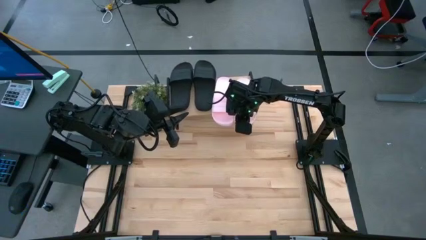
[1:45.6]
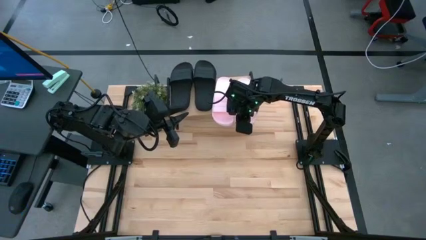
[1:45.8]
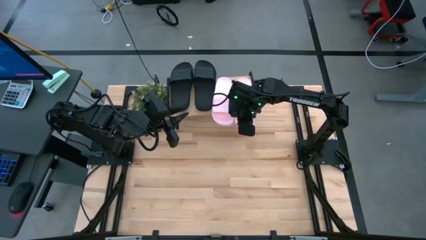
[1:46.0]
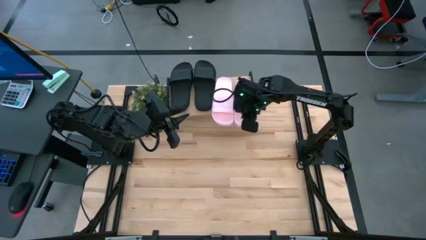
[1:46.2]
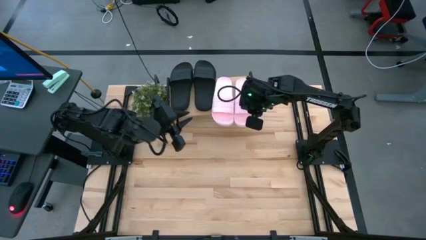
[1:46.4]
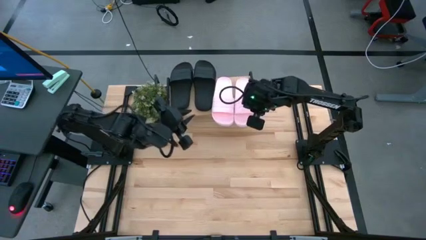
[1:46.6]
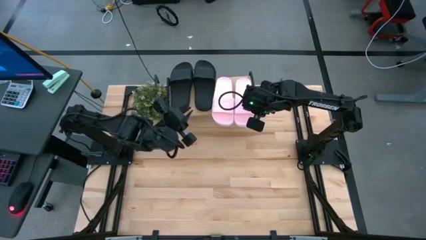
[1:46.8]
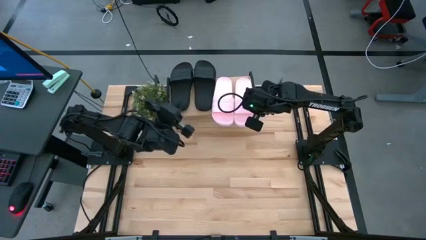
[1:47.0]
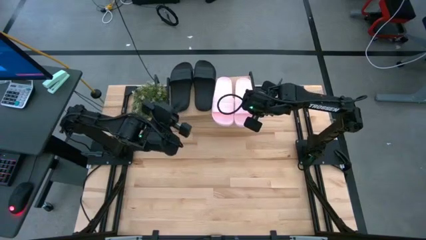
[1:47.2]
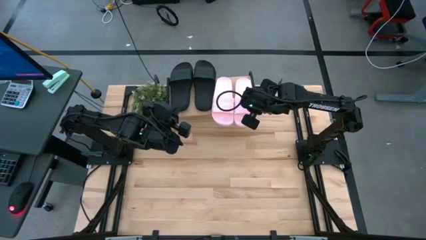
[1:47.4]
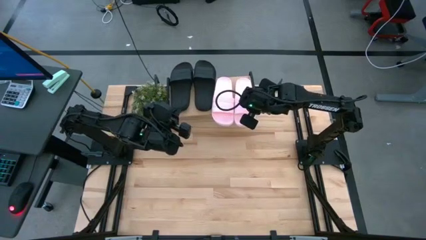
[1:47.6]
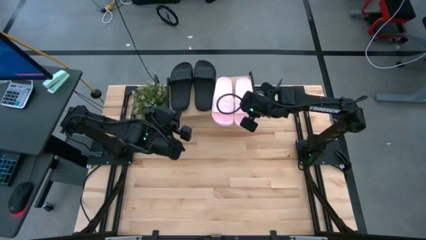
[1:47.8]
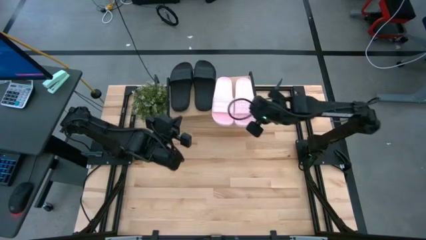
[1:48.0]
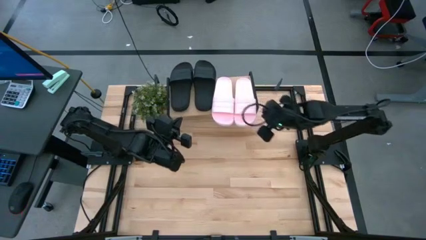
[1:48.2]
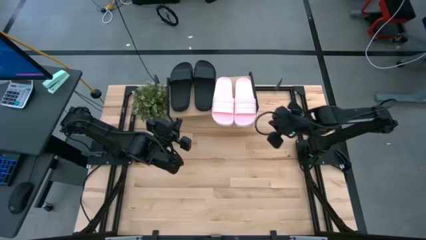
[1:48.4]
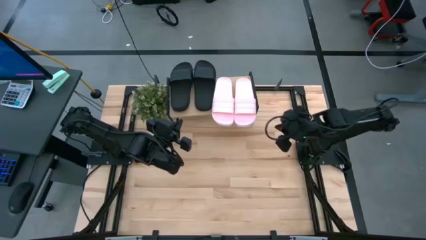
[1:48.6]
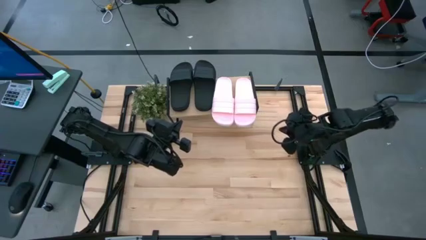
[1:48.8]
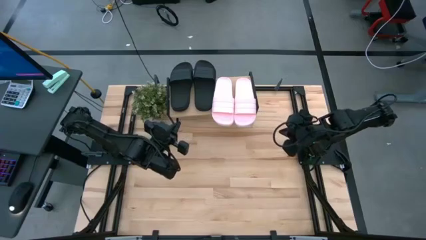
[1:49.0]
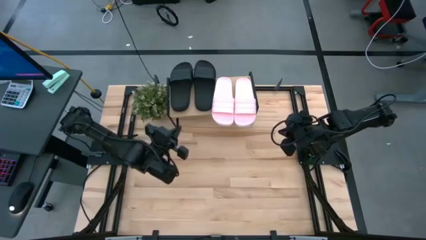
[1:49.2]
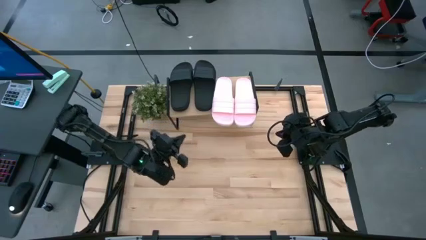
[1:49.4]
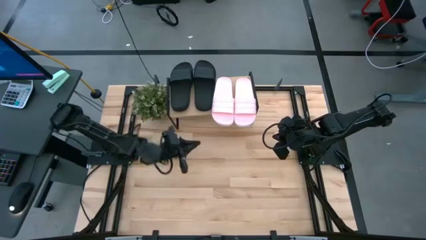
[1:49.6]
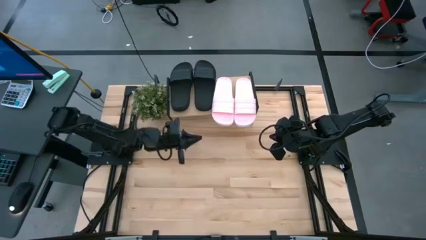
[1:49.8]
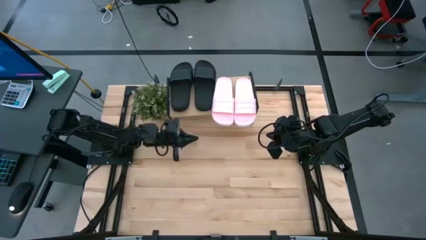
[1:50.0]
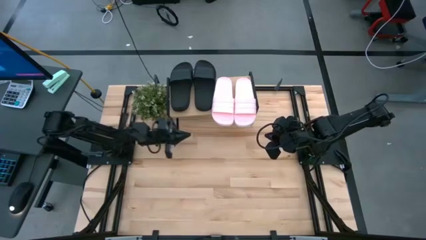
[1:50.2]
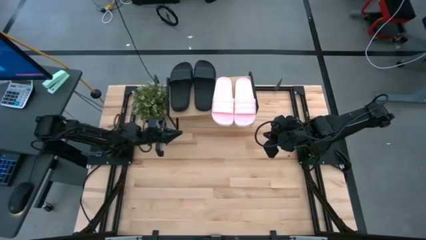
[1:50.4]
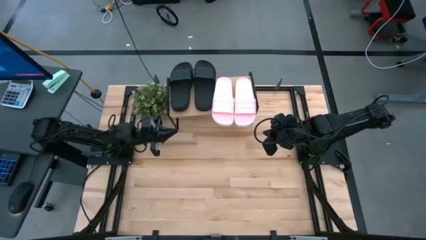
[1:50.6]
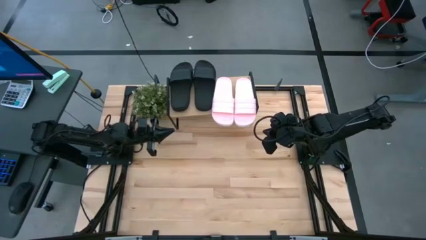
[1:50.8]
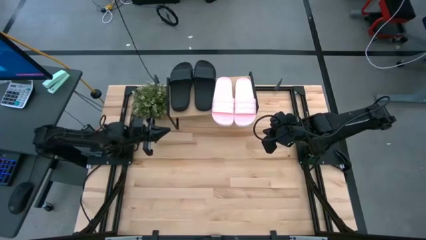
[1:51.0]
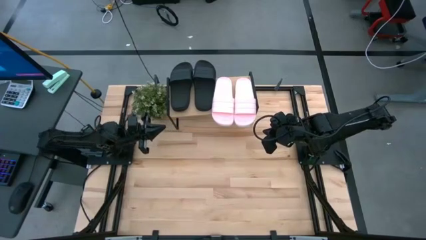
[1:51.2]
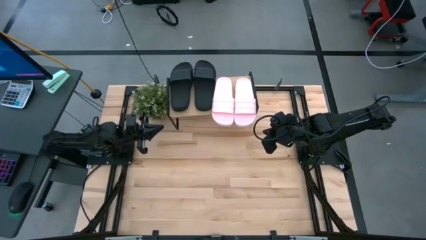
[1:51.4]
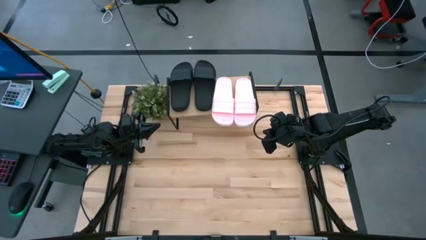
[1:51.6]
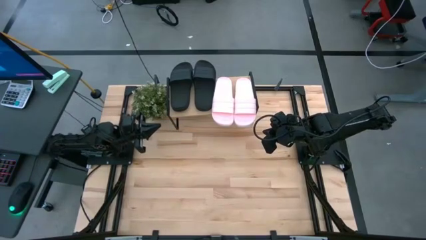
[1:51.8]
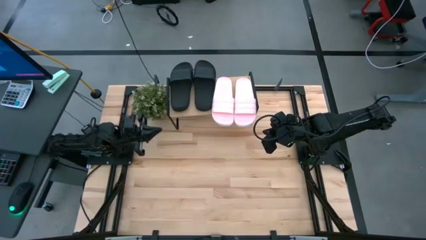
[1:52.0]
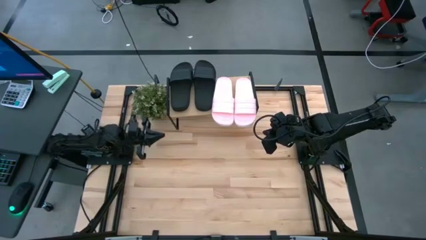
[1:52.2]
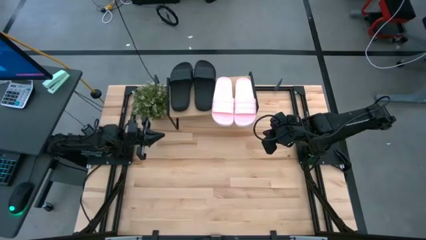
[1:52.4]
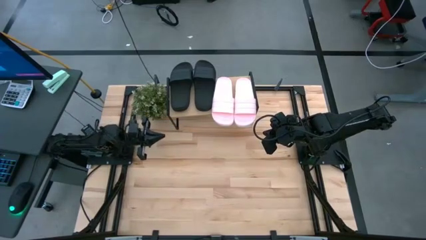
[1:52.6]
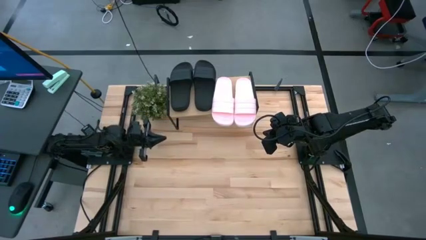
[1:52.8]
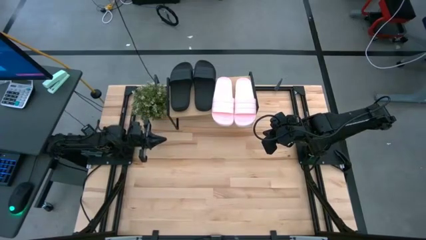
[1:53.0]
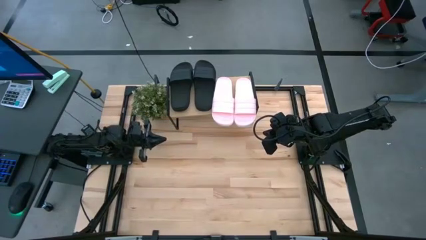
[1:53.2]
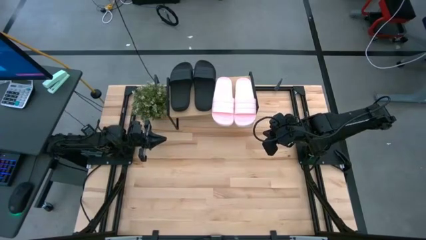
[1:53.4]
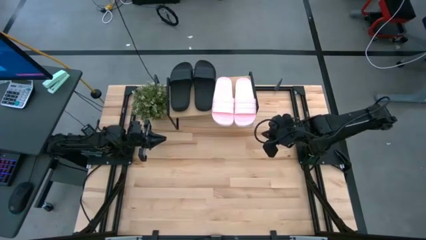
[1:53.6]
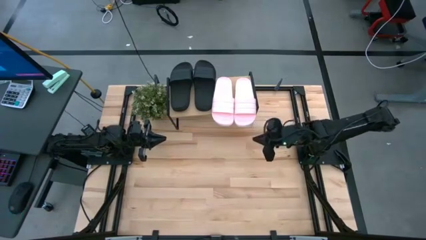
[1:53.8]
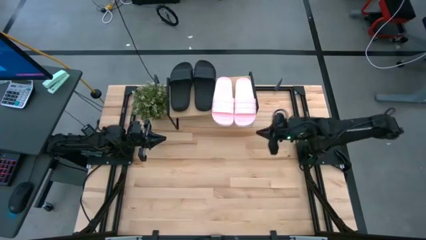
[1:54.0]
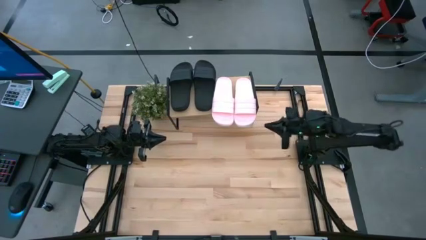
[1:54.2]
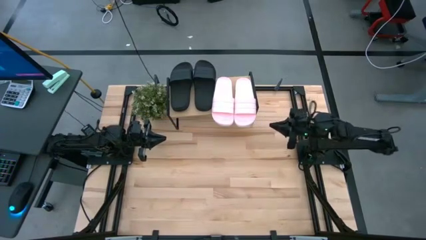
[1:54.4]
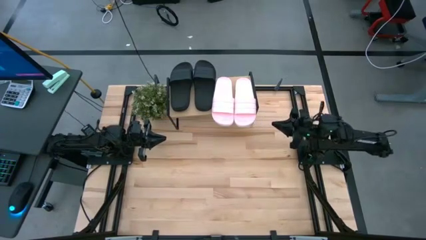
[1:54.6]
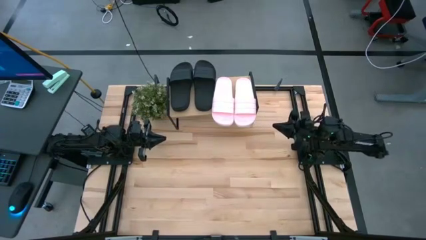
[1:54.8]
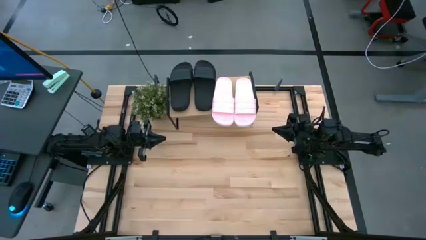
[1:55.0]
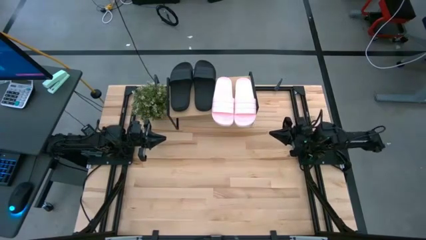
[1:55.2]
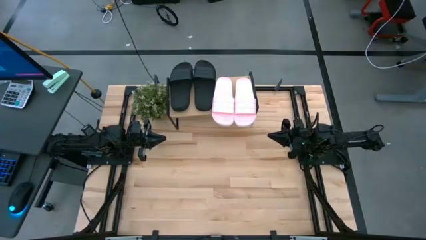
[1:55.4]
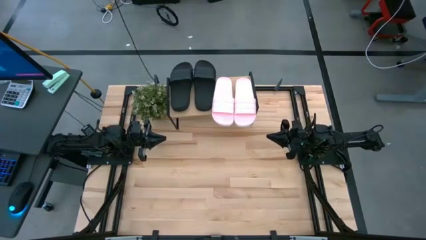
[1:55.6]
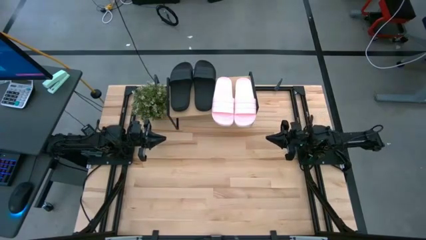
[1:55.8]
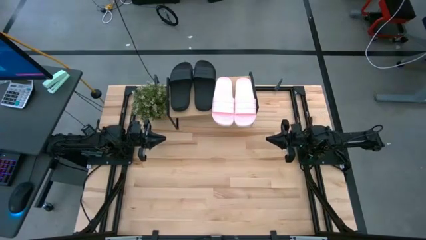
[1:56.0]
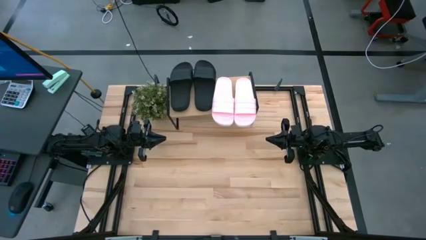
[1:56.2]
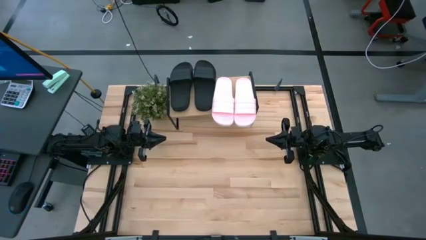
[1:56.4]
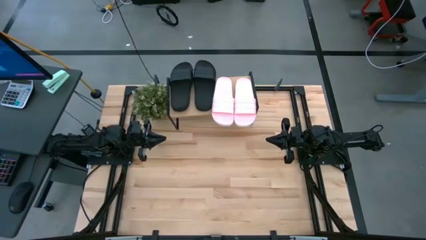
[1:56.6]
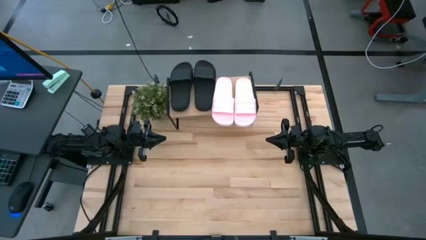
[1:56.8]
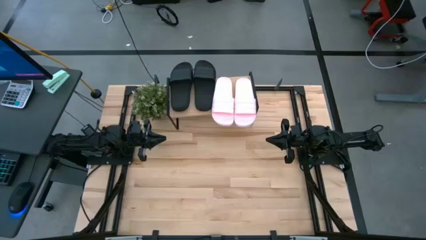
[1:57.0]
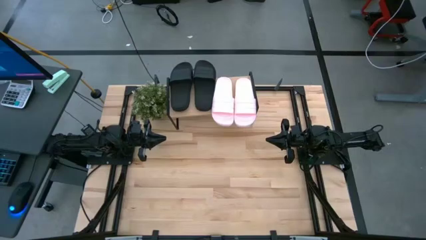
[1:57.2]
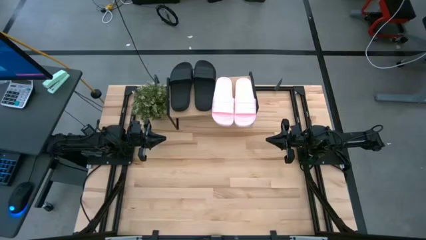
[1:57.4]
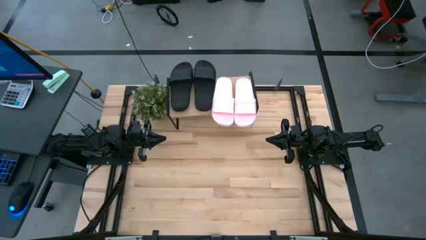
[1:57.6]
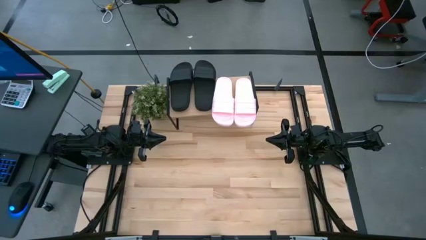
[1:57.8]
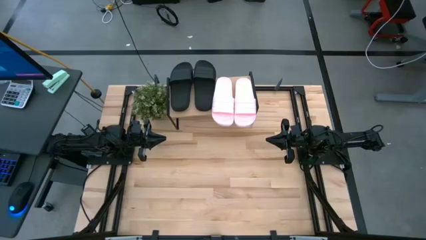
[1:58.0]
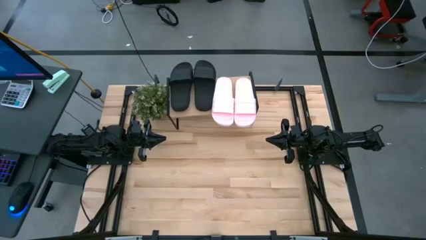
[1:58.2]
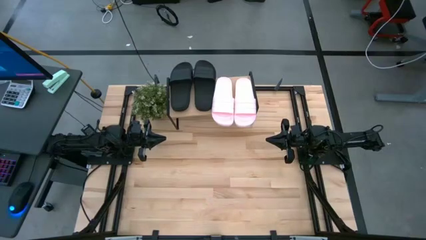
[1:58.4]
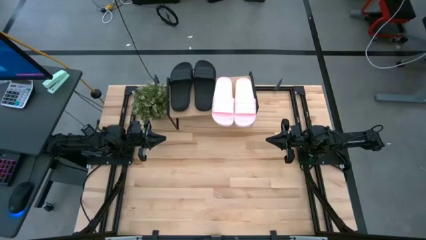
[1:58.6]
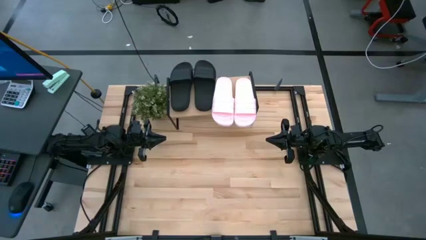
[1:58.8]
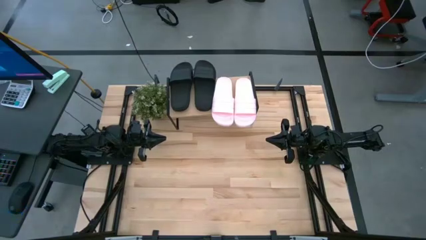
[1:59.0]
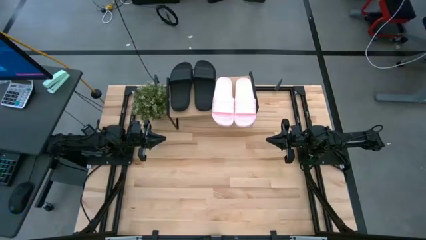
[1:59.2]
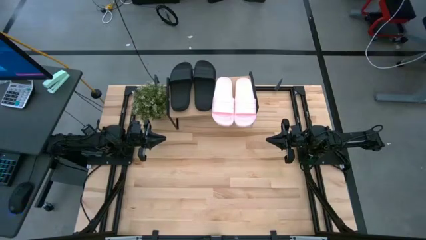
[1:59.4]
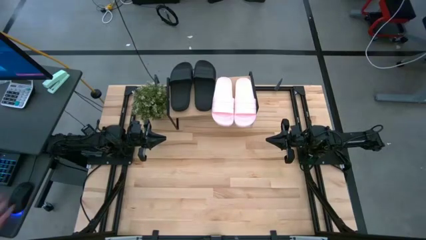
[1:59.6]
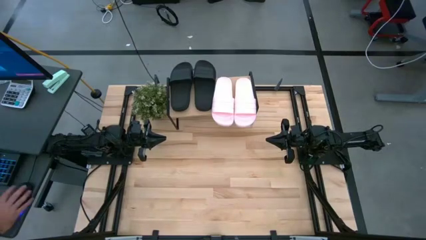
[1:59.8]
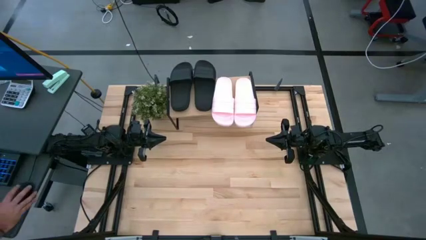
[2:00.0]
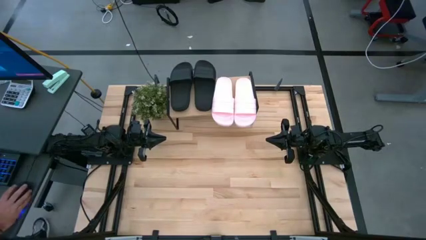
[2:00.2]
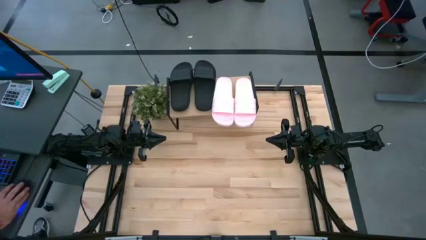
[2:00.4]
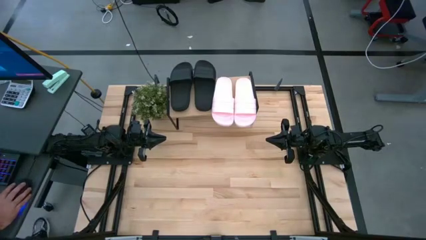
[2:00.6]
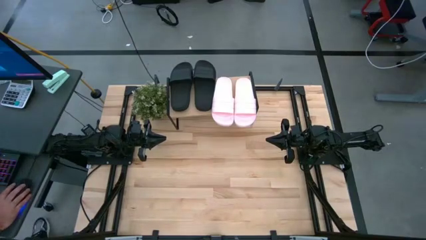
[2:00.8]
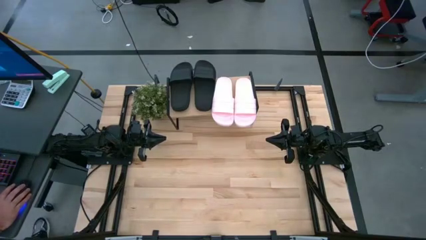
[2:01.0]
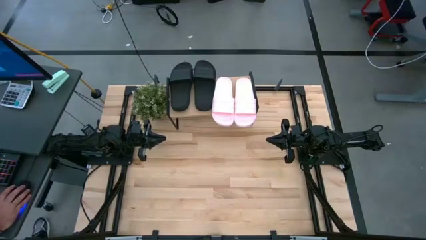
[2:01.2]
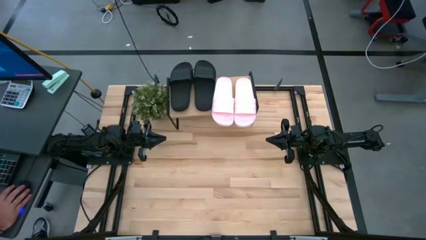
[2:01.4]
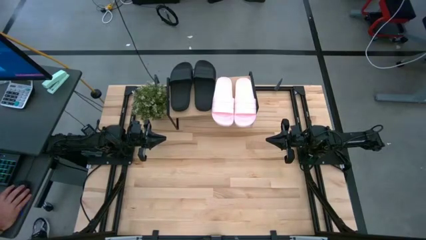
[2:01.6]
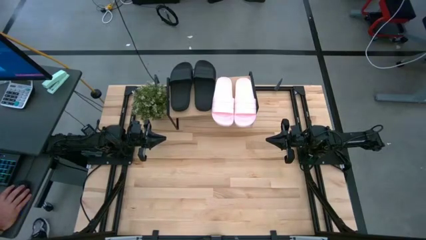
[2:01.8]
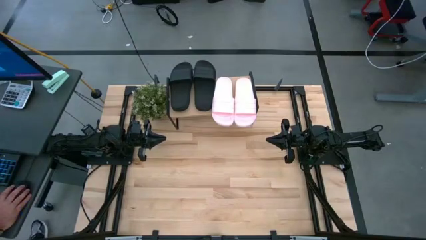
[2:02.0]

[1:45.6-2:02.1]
Task: Pick and place slides into the shelf
Return to Home Position

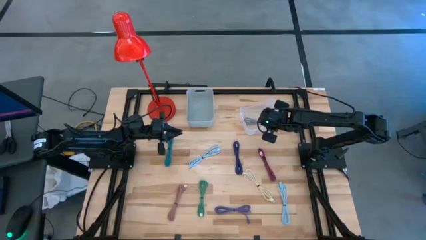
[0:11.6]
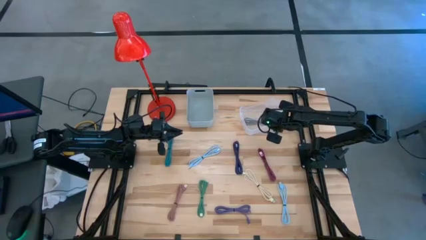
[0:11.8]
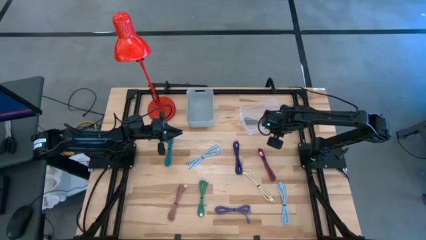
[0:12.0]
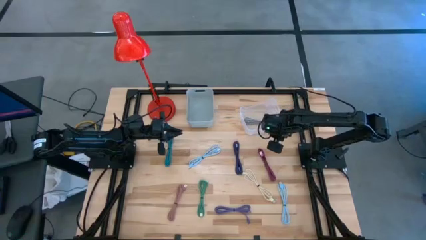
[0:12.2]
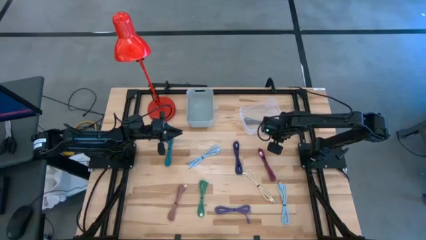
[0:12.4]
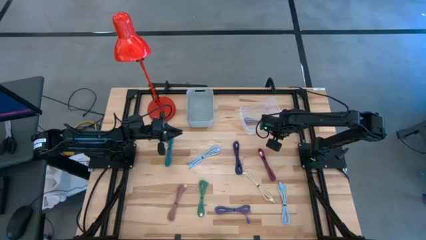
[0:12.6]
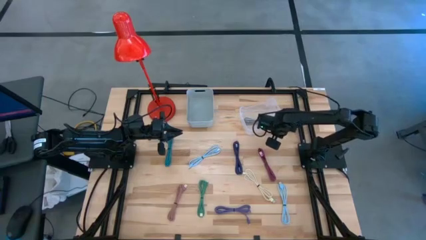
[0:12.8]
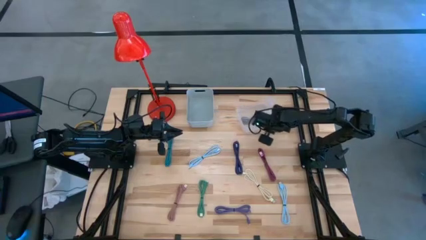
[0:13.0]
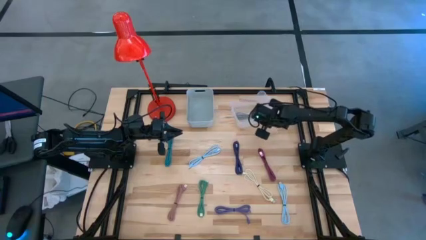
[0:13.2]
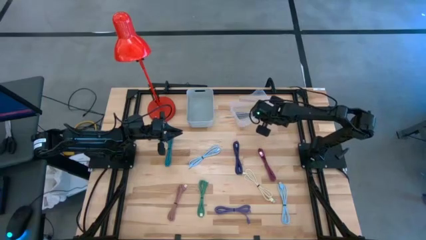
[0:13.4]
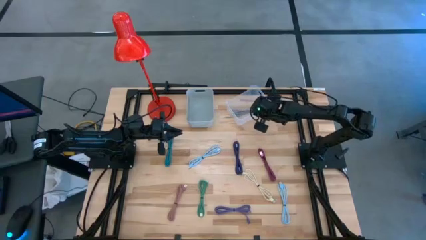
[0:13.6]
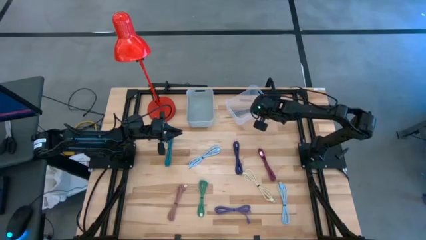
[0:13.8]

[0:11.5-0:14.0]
Task: Pick & Place USB Port
Adjust the transparent bin
